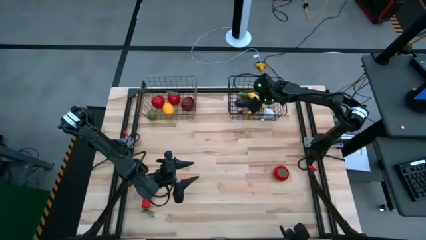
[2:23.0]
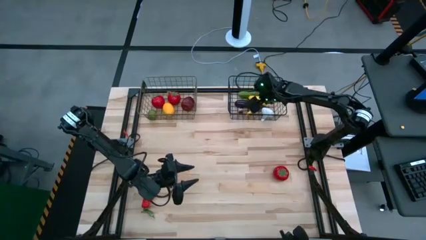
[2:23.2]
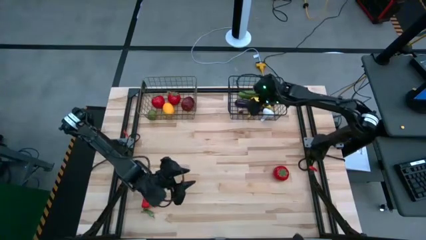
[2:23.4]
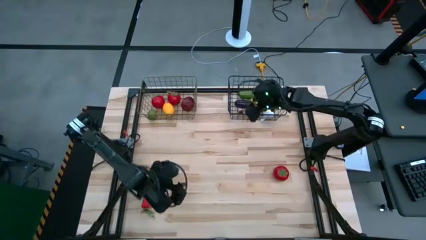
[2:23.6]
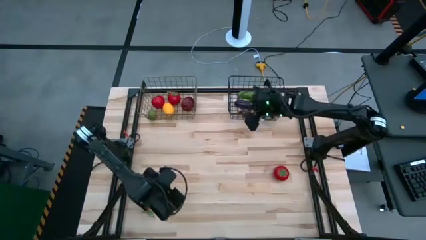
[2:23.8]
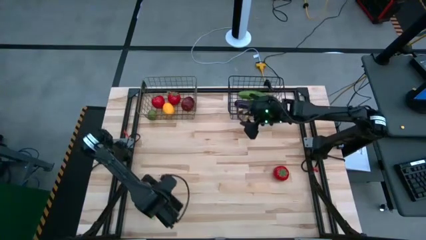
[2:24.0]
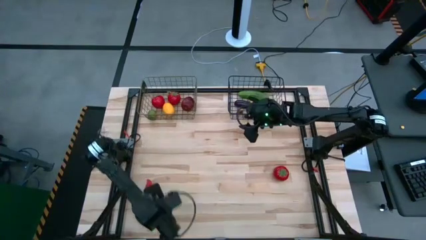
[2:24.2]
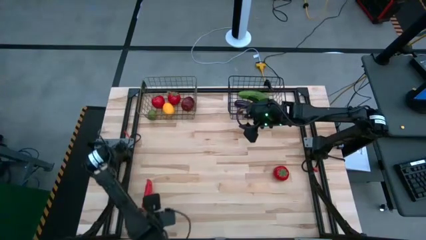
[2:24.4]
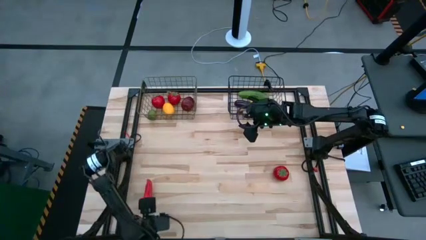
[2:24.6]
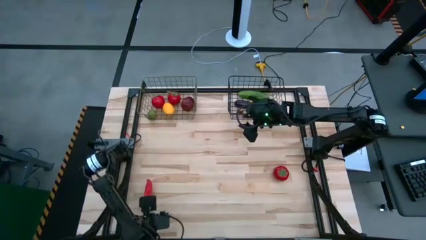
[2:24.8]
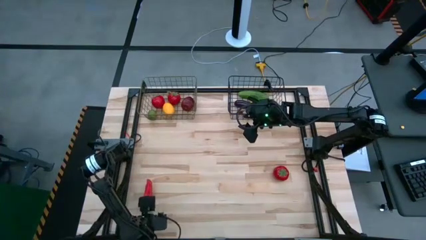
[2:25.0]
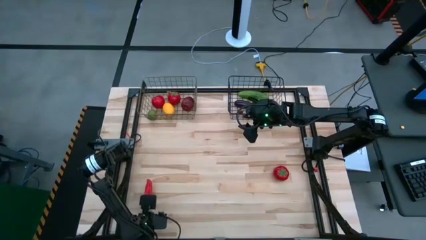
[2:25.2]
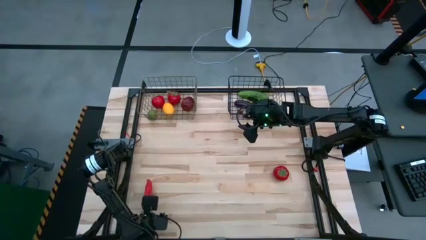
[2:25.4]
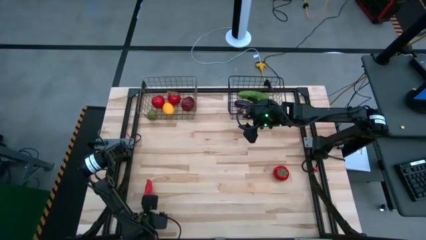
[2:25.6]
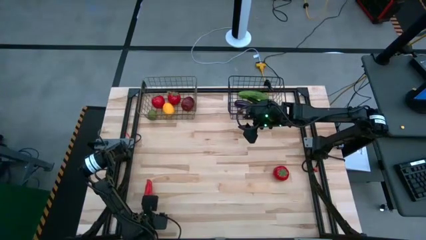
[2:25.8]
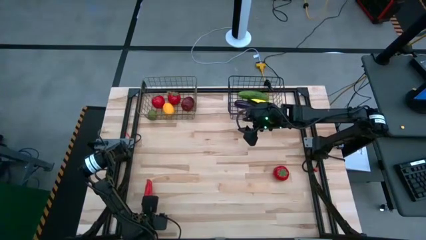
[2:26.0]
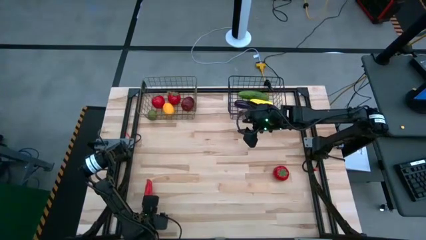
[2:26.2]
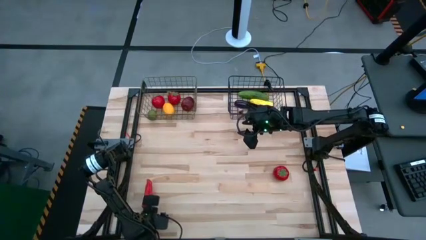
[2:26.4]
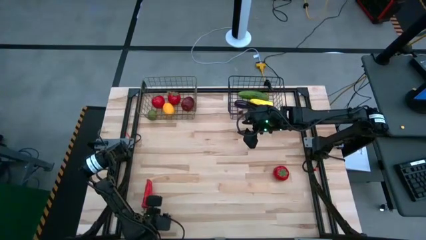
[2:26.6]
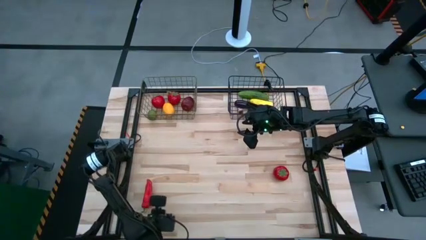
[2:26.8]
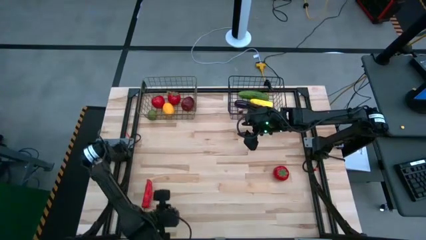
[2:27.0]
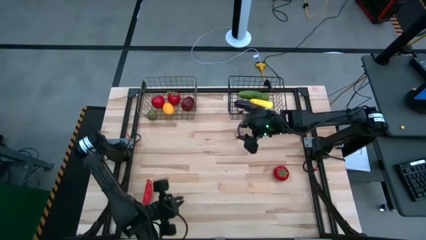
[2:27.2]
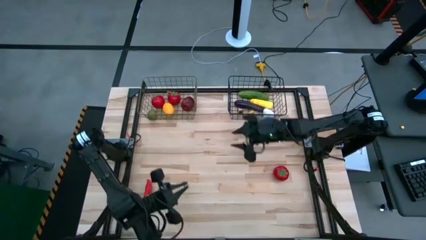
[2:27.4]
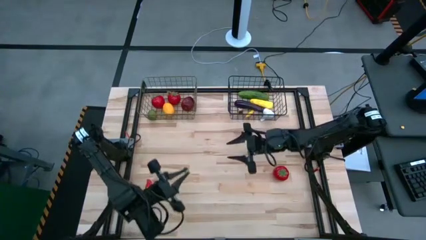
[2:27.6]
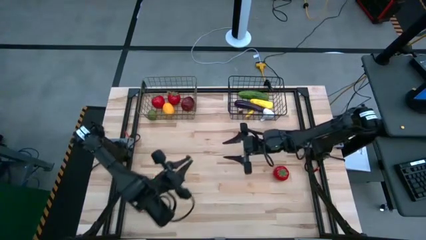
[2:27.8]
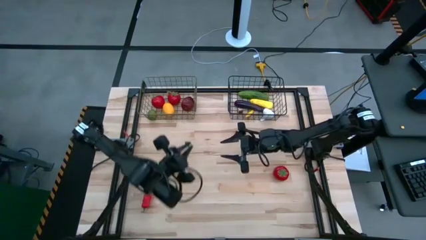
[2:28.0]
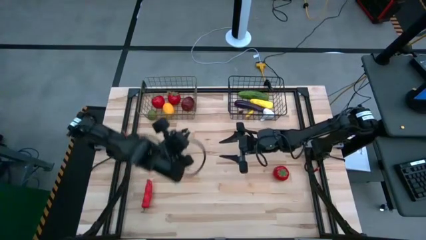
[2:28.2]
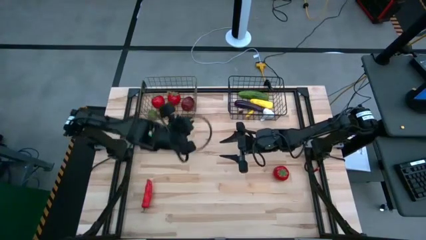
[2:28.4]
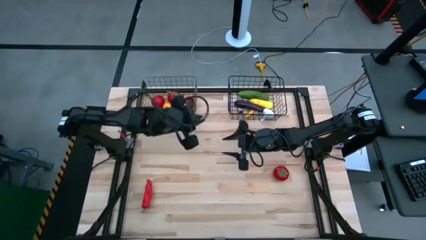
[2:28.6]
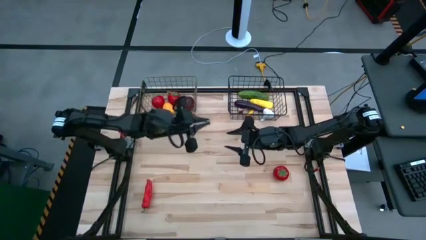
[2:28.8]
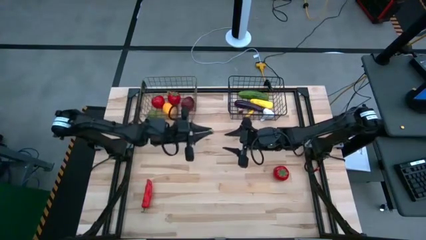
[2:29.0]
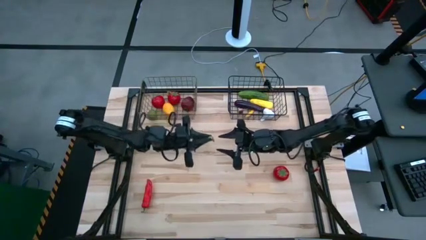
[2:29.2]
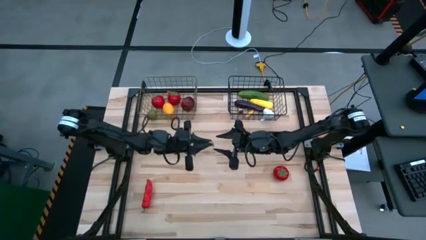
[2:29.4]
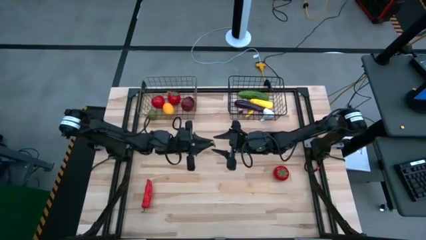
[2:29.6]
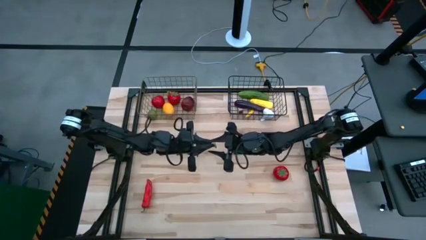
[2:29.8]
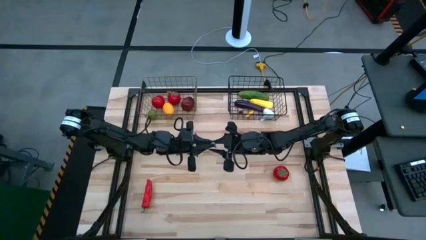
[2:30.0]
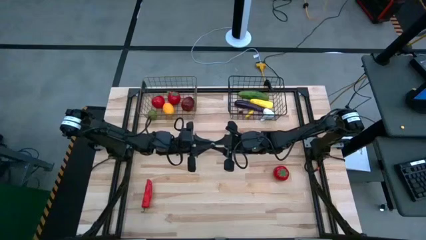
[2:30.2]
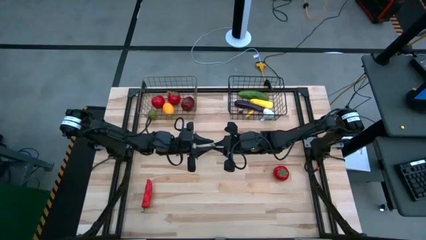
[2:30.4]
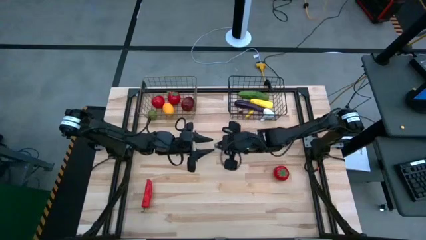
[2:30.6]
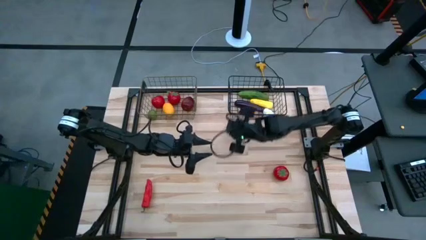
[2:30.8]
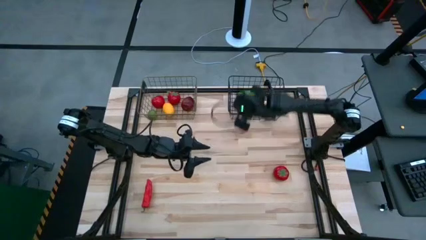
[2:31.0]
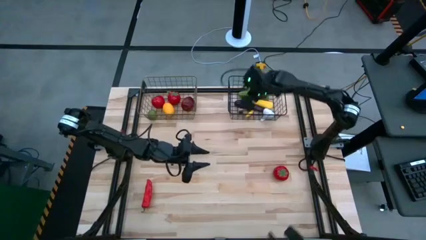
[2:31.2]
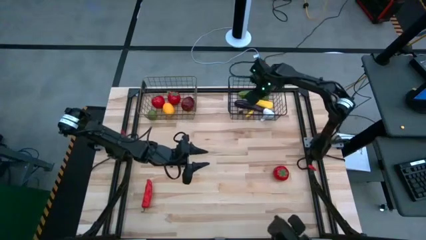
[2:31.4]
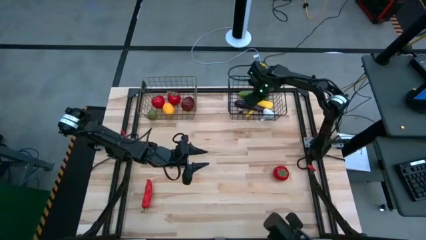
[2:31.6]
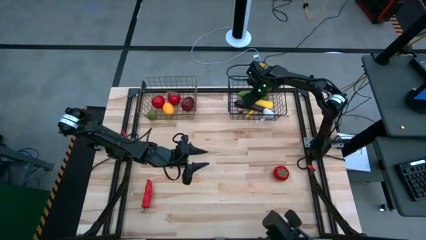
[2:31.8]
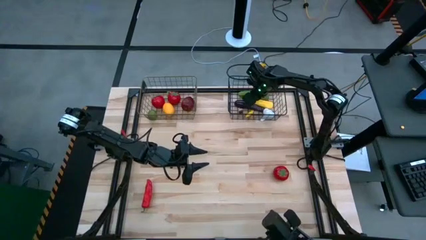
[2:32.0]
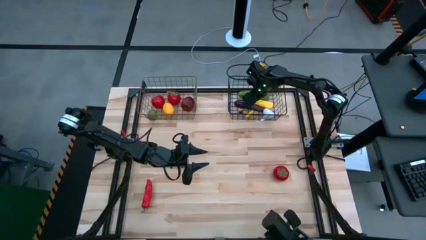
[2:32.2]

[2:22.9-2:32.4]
Task: Sort produce into baskets
Put the green chili into the right wire basket

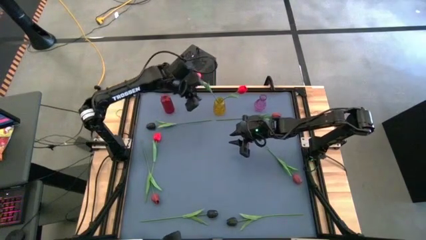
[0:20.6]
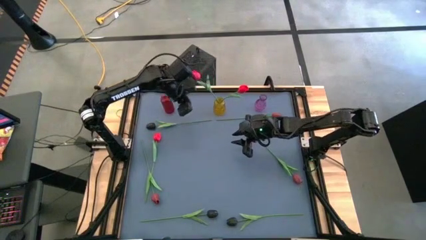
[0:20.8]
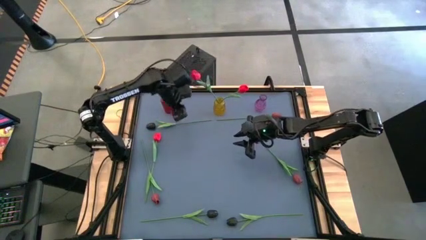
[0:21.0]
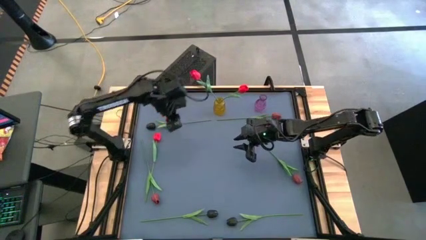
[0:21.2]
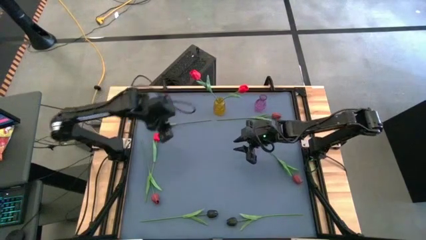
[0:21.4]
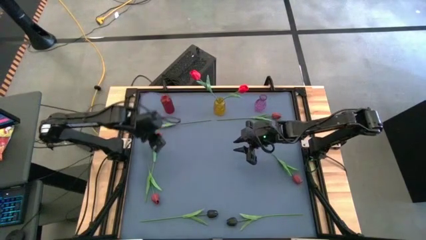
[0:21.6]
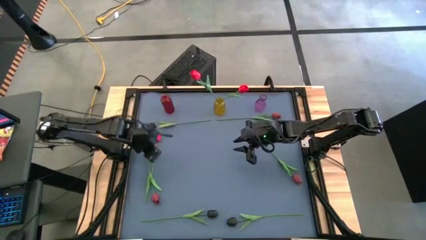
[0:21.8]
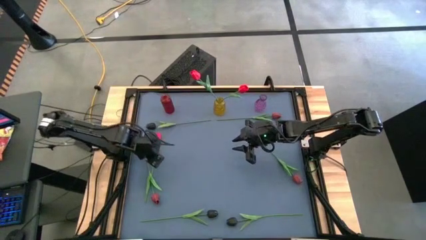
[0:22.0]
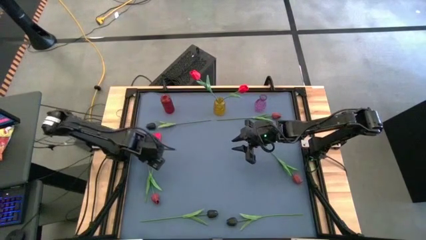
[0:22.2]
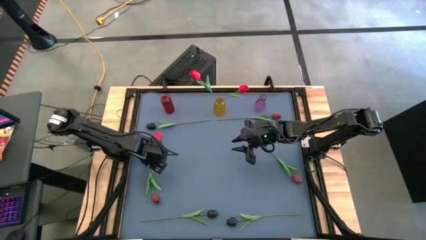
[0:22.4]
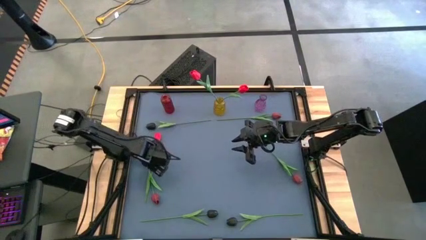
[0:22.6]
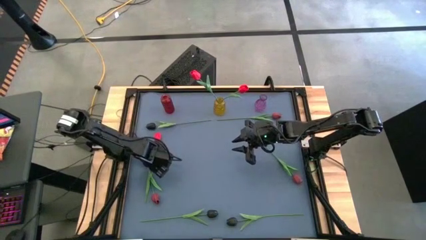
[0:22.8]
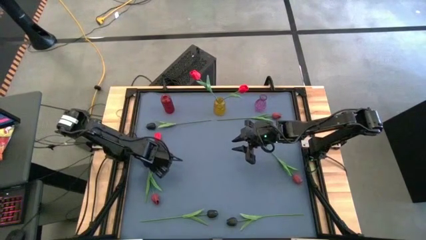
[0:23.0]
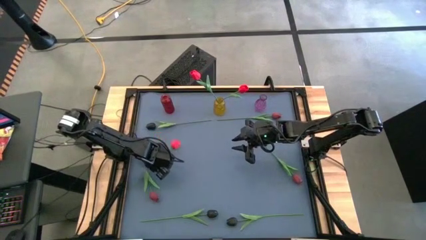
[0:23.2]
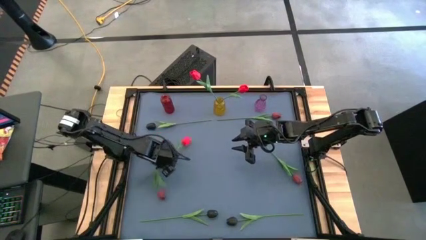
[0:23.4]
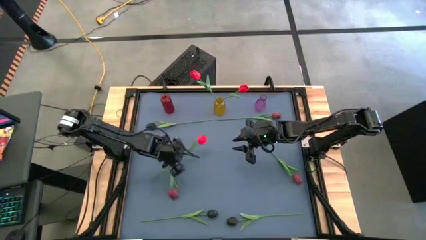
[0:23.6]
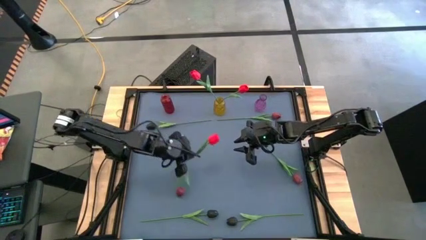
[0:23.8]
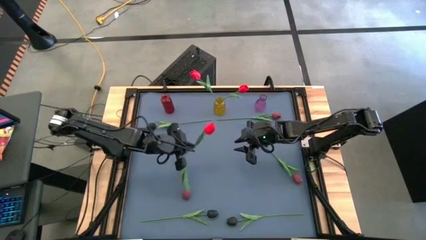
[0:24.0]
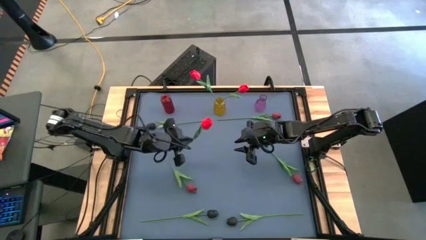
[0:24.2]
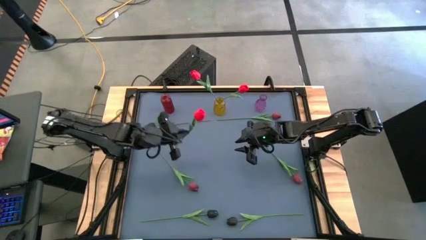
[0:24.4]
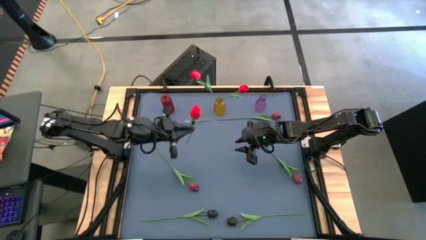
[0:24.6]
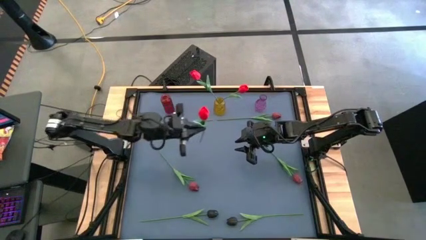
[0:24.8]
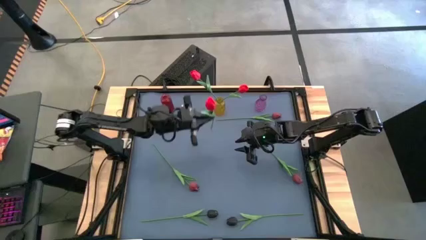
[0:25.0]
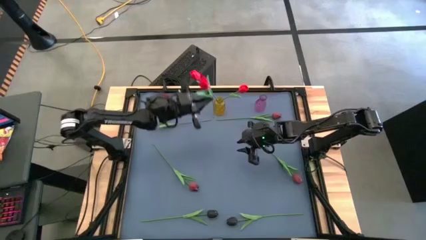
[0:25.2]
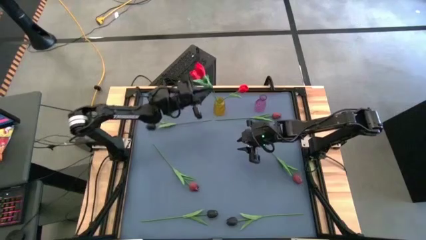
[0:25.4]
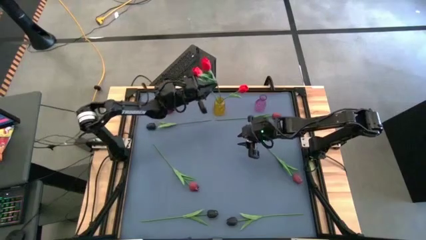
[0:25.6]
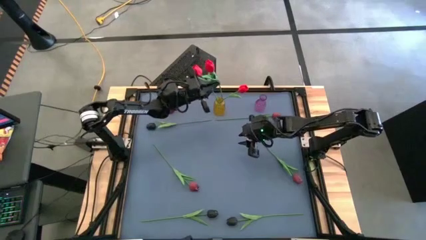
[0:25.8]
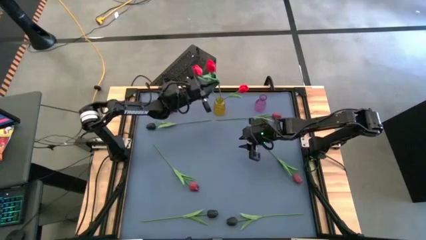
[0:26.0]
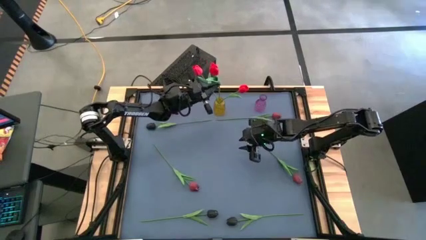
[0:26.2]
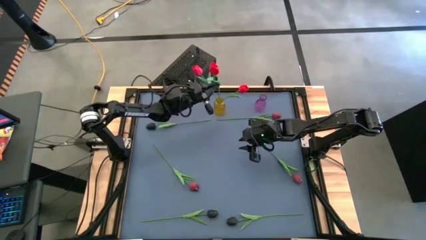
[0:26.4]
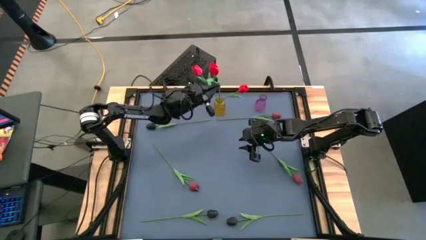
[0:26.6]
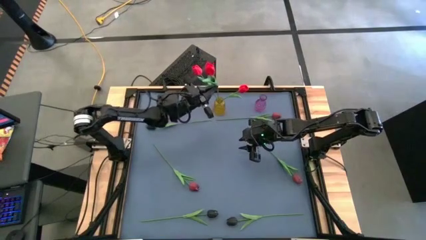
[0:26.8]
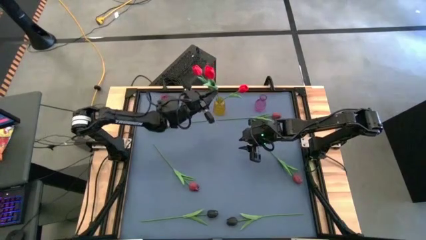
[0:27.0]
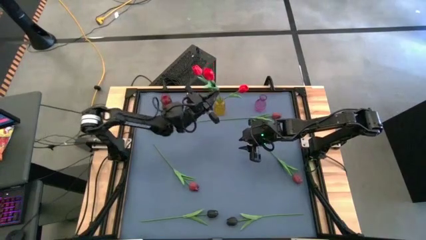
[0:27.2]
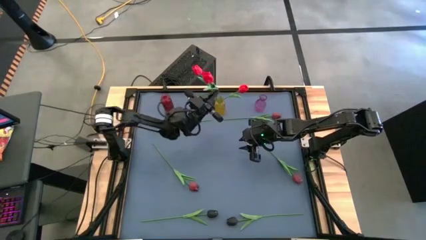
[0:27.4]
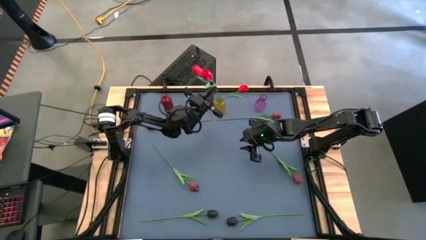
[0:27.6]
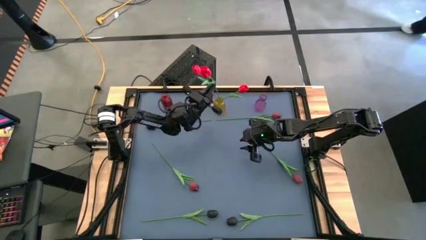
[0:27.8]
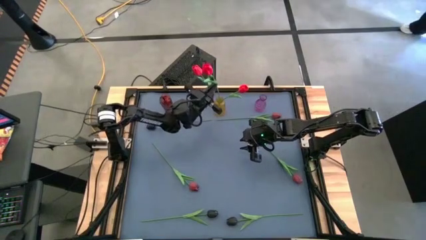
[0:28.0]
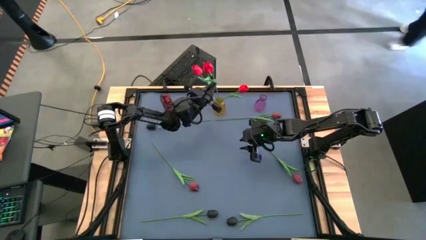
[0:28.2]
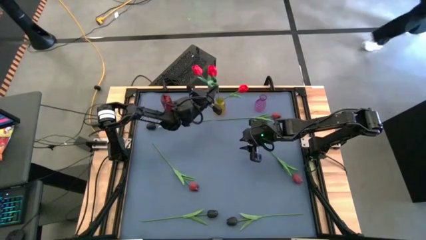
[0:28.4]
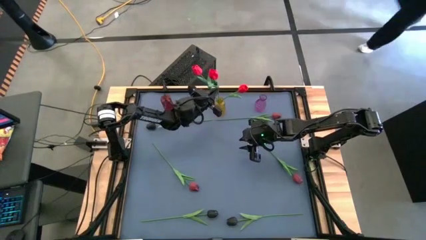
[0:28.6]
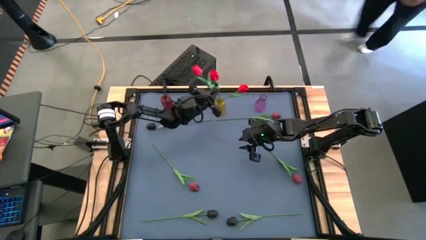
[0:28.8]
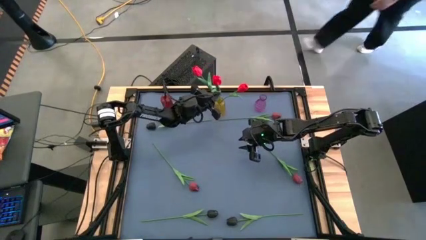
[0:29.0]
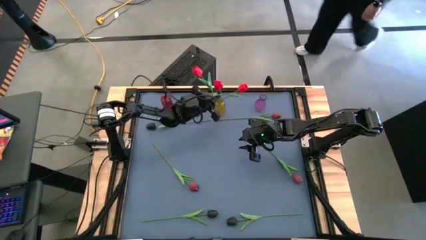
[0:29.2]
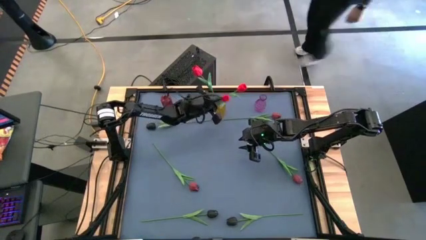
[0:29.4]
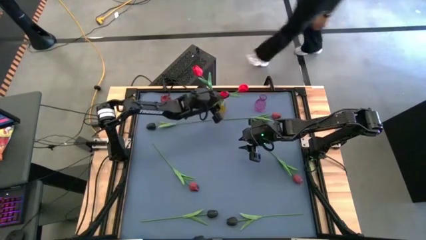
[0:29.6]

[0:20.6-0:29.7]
Task: Sort flowers into vase by color
Put the red tulip into the yellow vase
